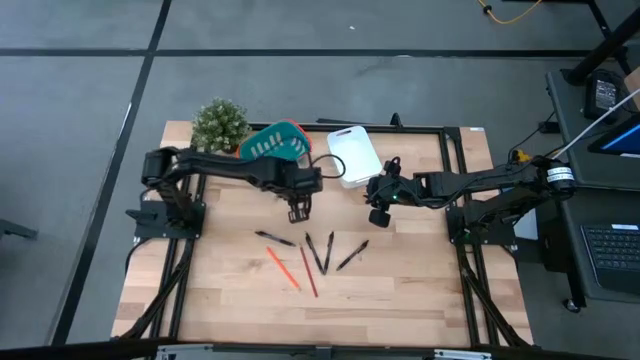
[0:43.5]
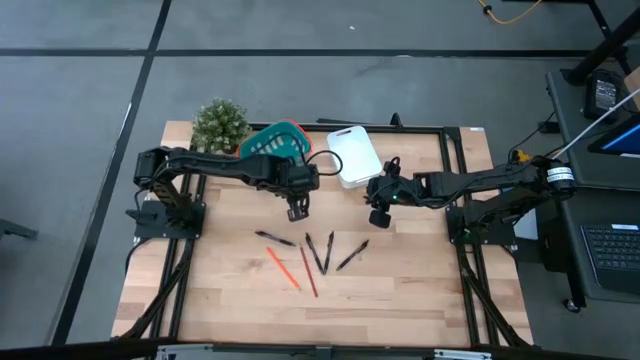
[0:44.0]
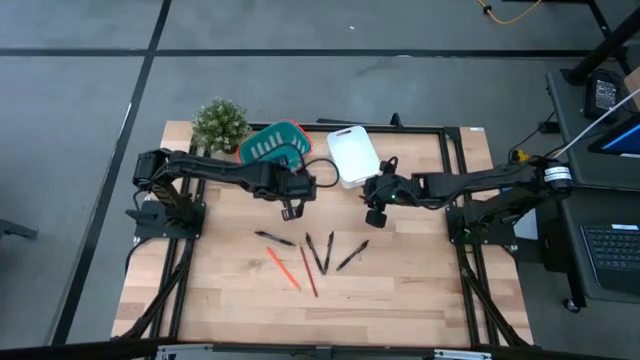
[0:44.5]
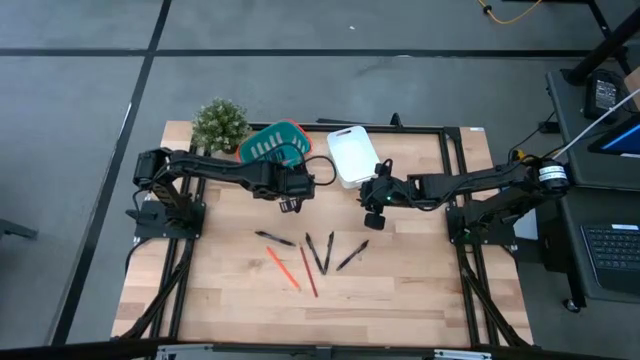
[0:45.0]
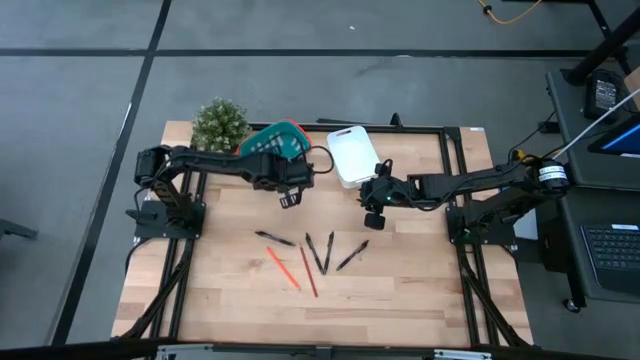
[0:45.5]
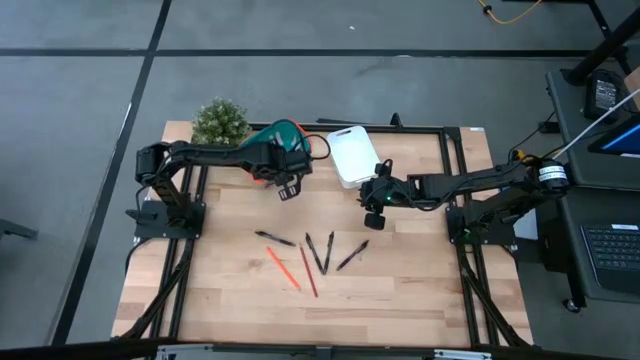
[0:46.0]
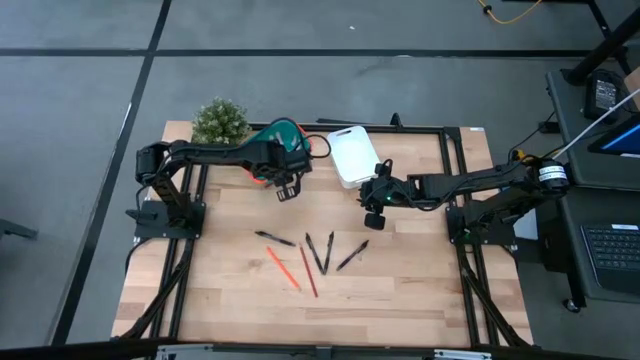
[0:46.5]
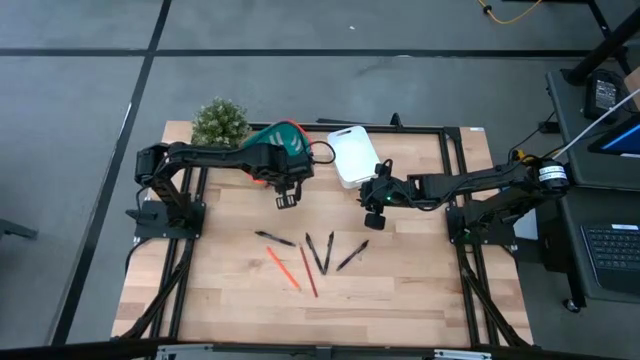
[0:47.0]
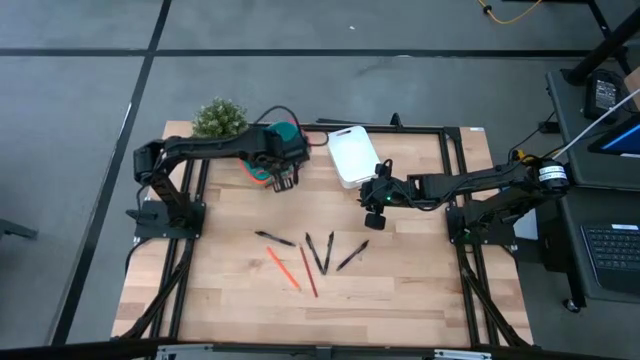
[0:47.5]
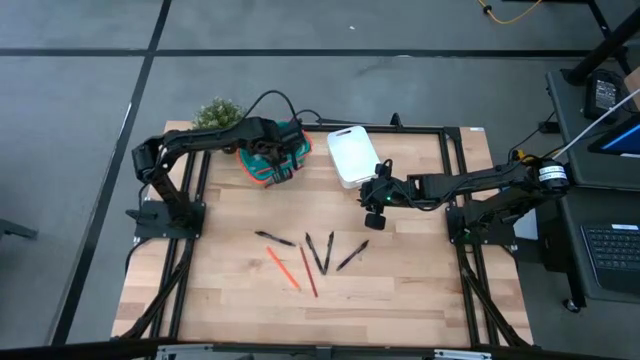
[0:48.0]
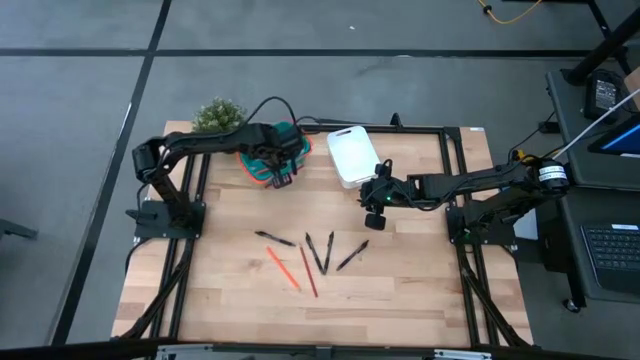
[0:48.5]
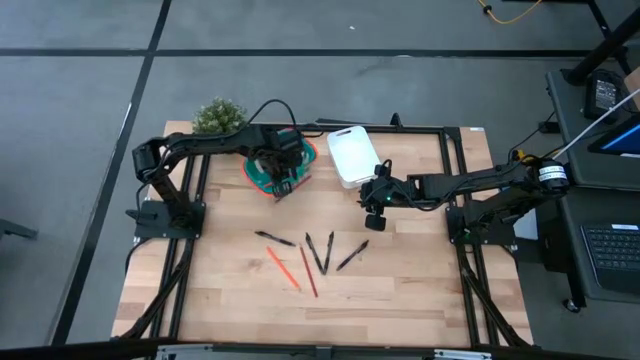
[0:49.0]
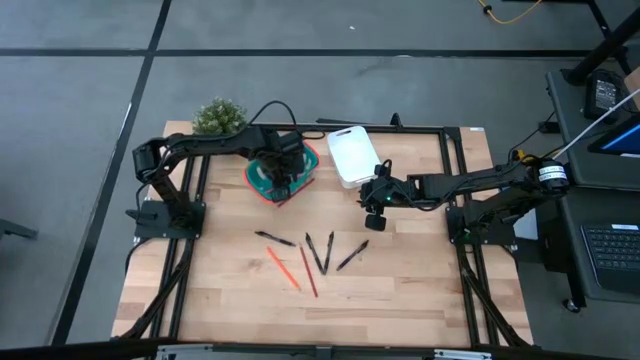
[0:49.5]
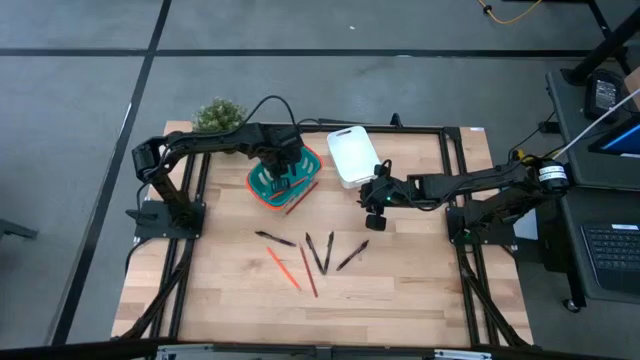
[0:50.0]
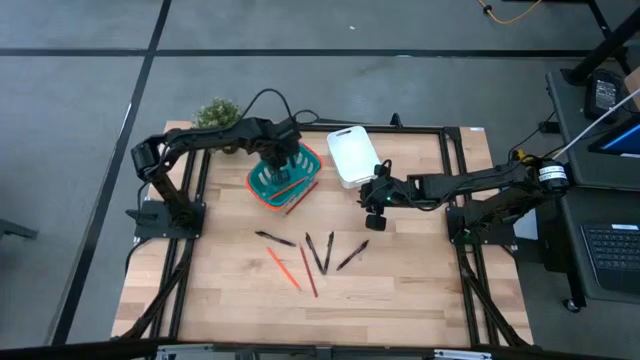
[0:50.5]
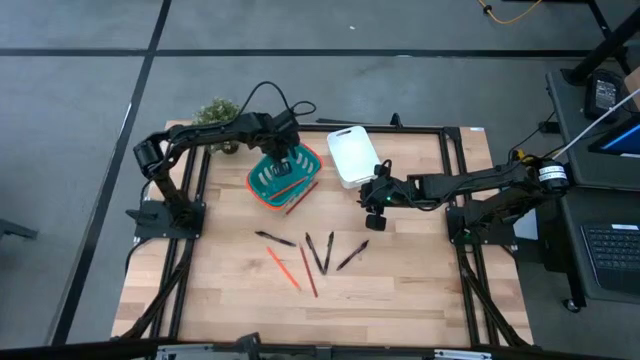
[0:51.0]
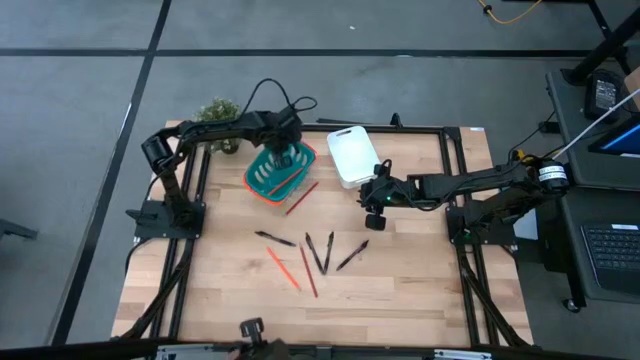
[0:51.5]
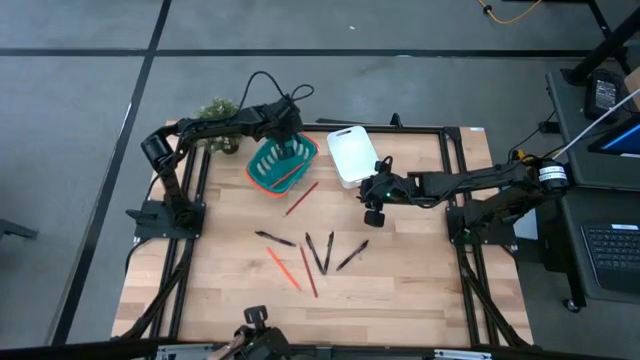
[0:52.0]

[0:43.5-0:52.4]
Task: Sort pens & pencils
Adjust the green basket

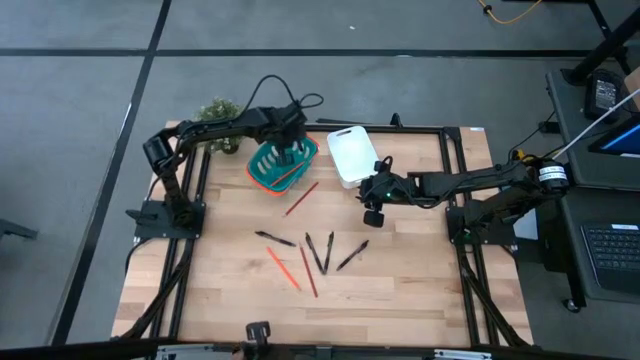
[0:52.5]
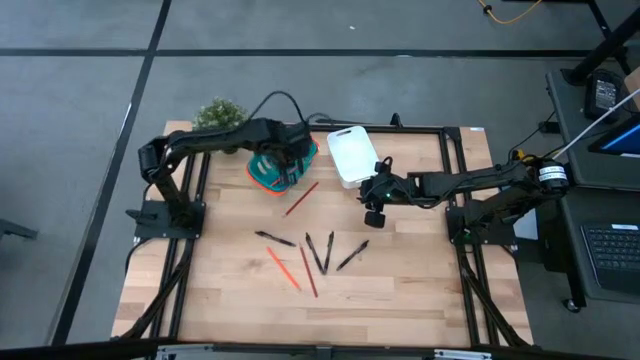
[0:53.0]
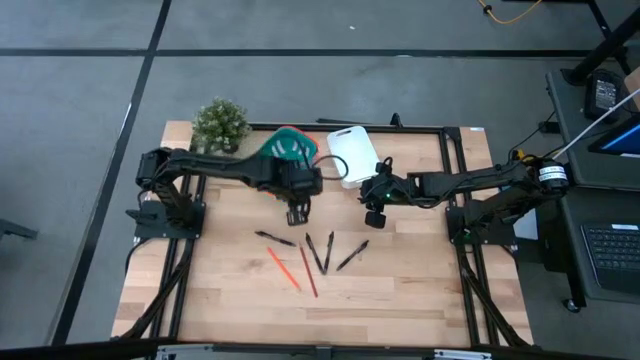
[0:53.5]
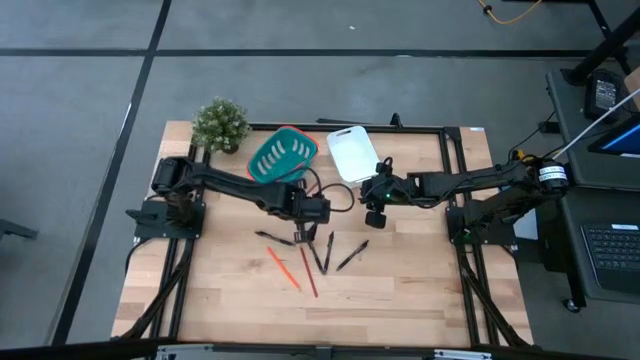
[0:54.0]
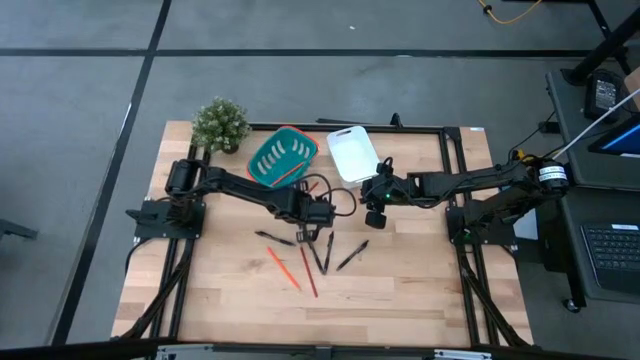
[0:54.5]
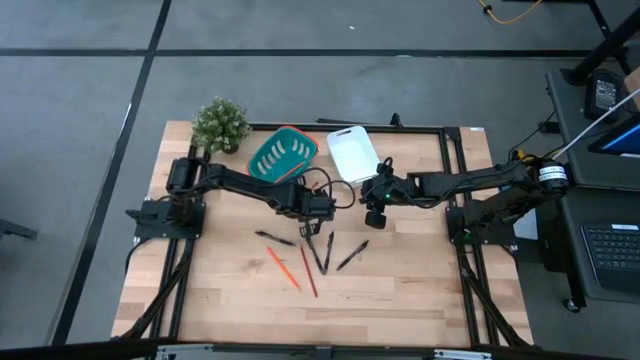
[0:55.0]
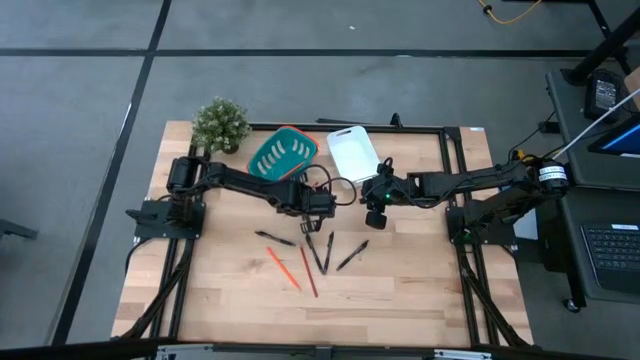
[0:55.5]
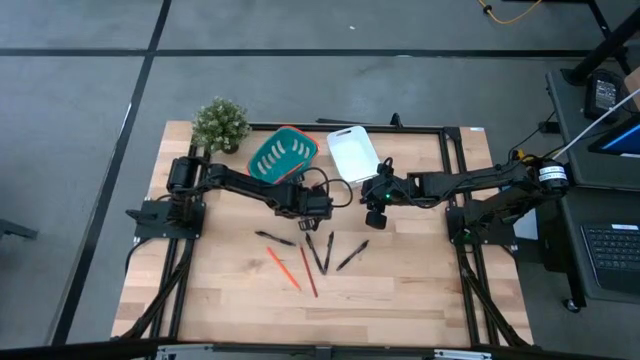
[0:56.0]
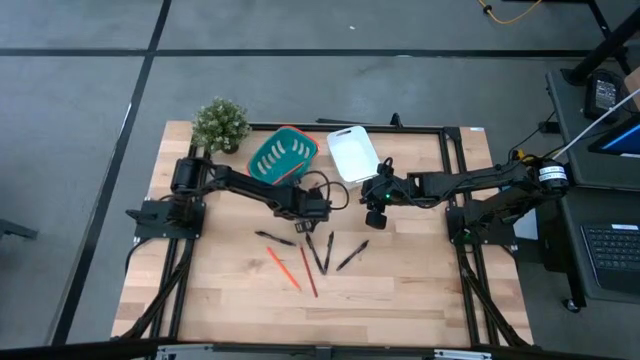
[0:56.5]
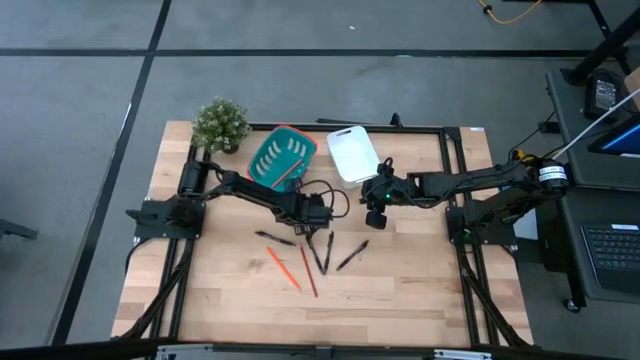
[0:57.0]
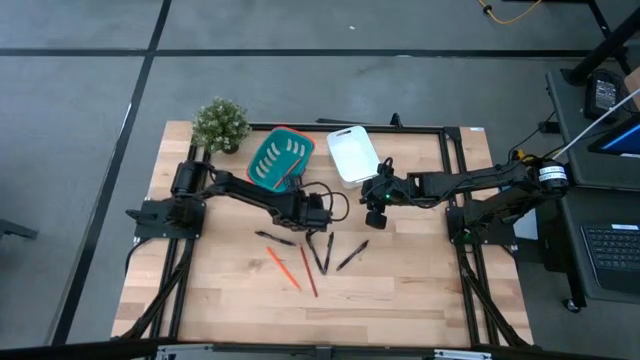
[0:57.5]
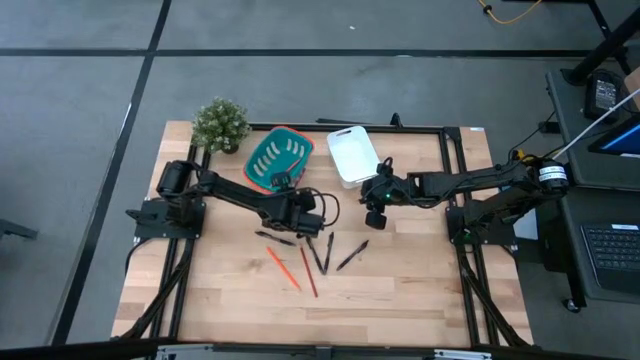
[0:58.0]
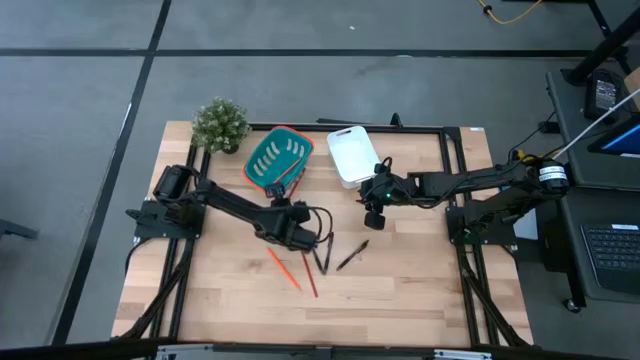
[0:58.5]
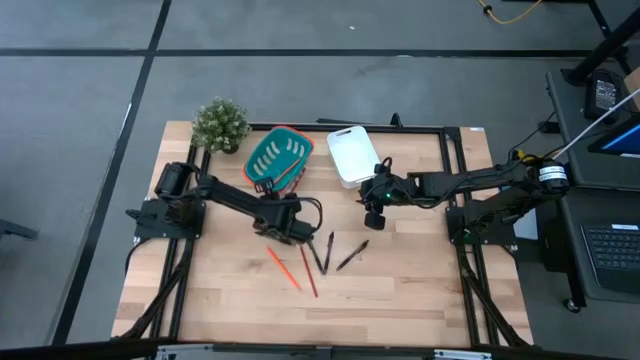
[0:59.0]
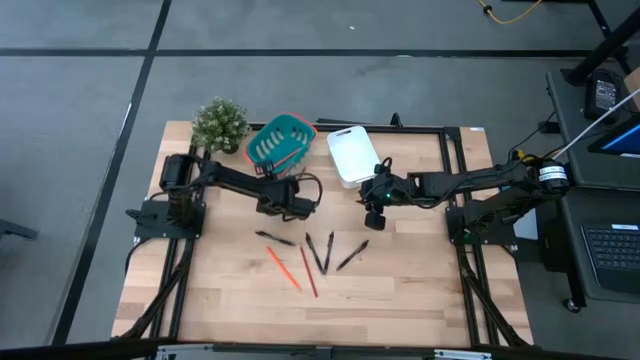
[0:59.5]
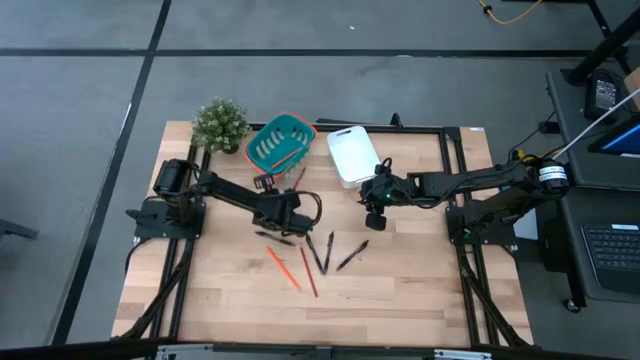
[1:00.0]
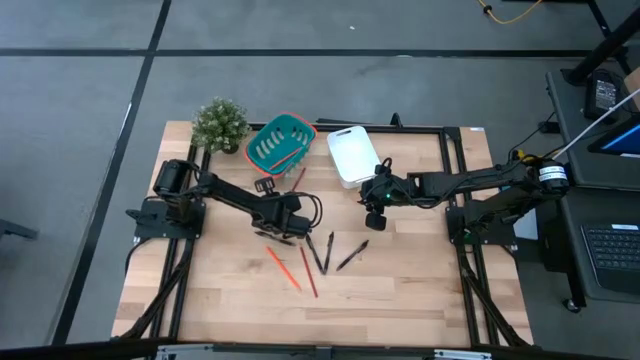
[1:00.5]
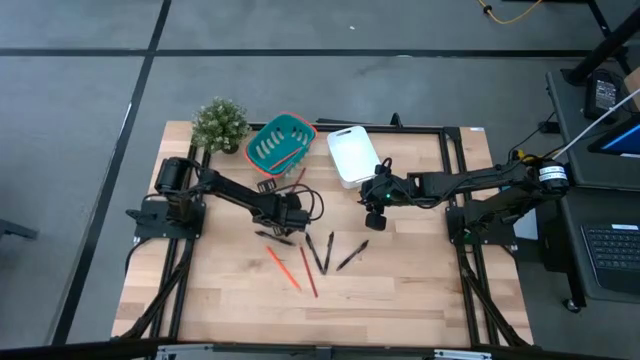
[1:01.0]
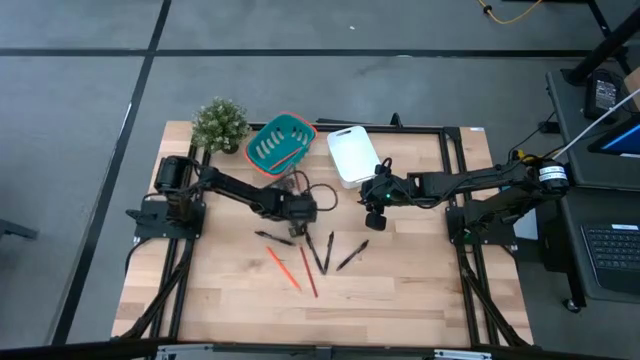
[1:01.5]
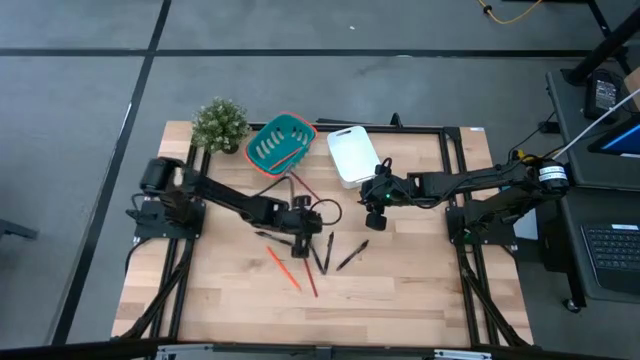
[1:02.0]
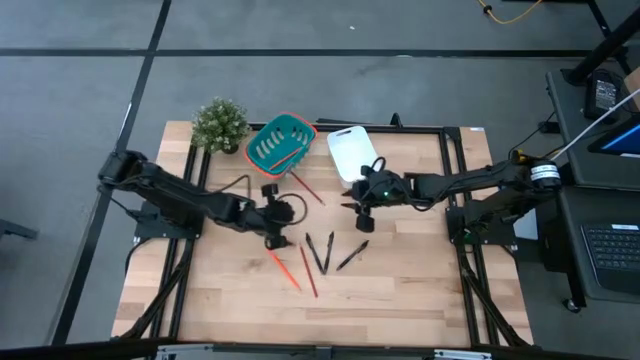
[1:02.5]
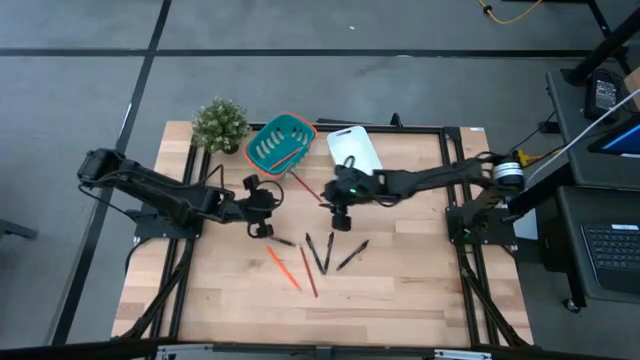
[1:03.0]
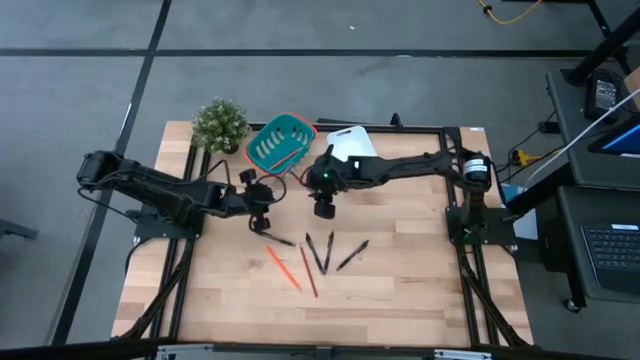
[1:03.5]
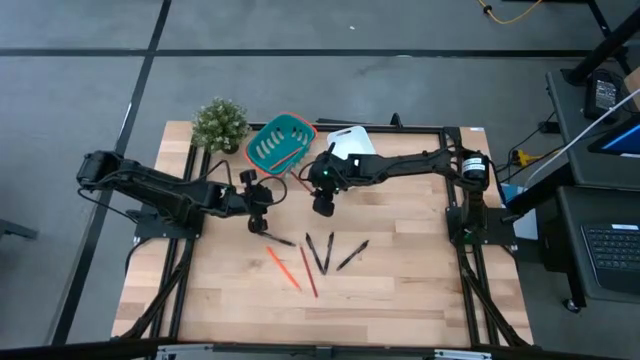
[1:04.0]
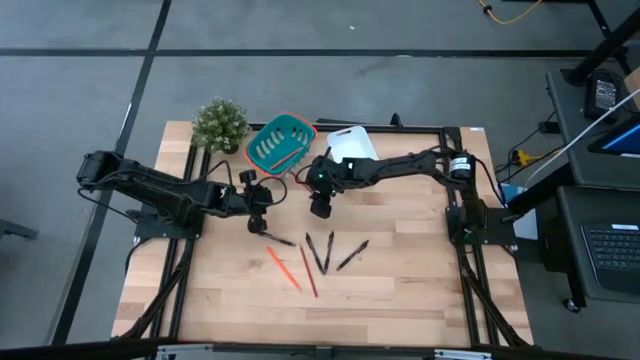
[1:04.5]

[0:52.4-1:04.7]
Put the red pencil into the green basket

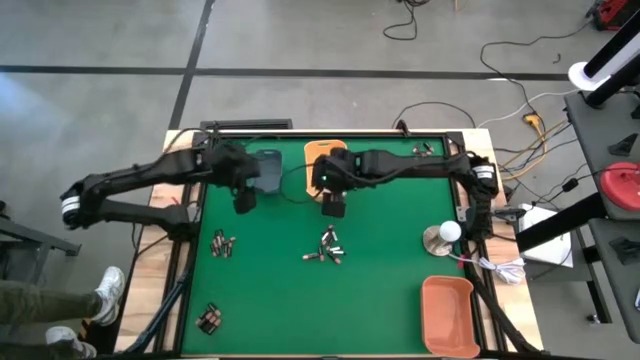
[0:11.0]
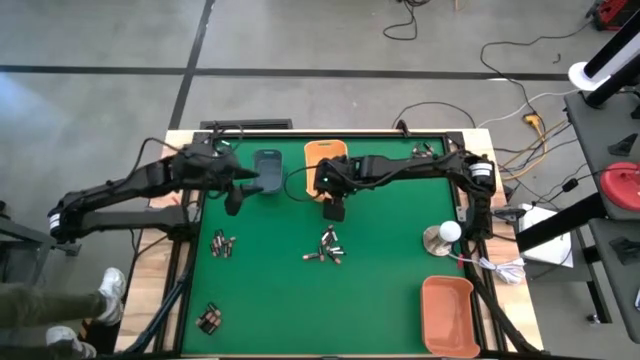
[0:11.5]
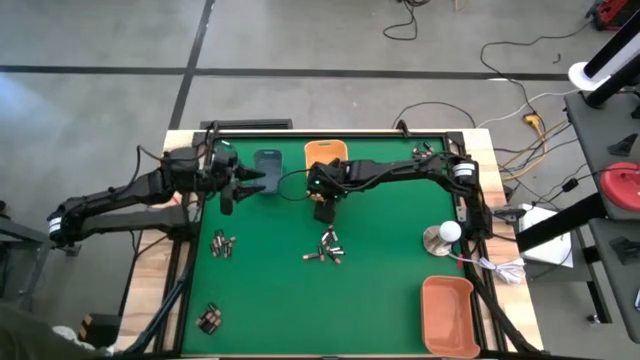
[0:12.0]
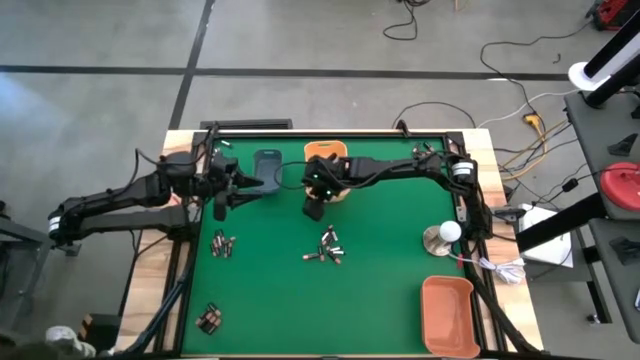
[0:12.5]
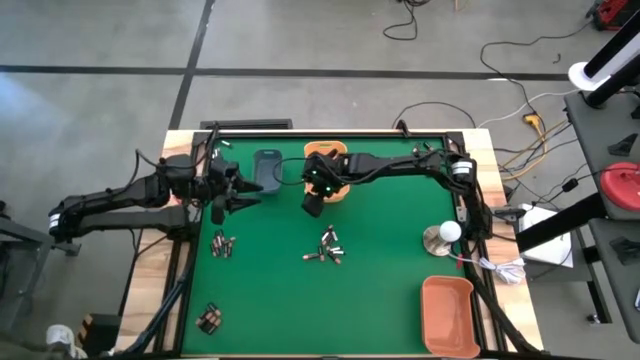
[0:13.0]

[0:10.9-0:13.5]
Task: Sort batteries
Adjust the yellow bin
